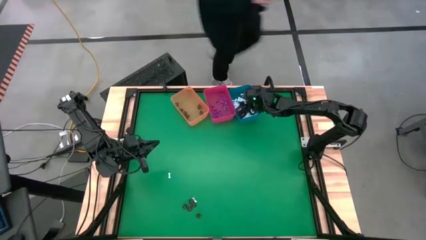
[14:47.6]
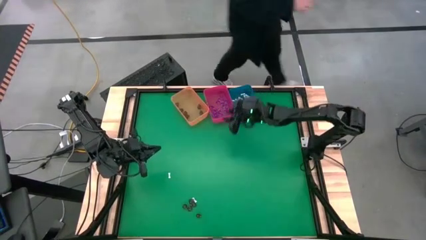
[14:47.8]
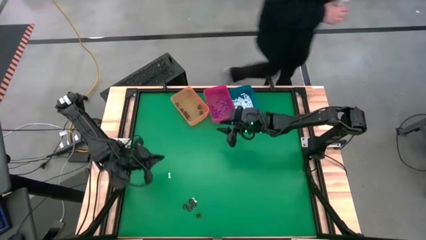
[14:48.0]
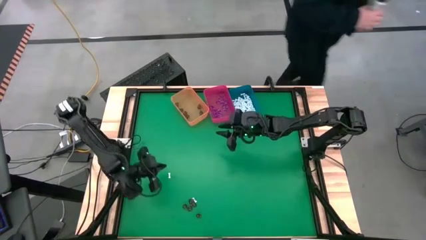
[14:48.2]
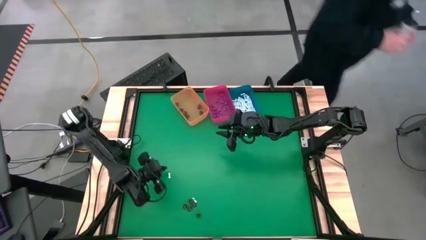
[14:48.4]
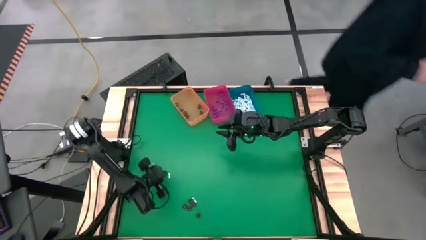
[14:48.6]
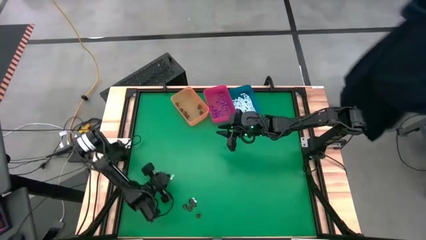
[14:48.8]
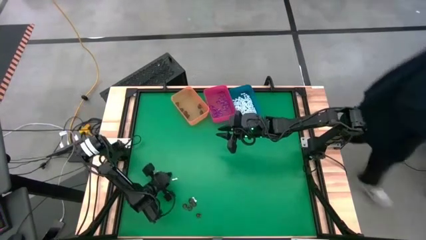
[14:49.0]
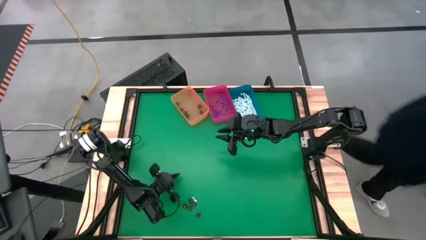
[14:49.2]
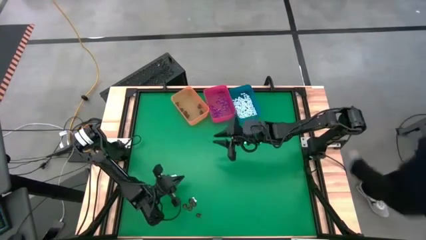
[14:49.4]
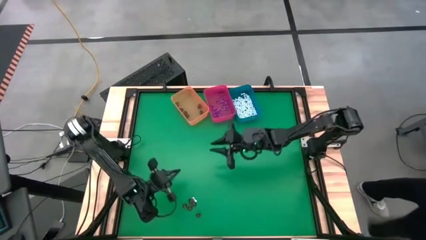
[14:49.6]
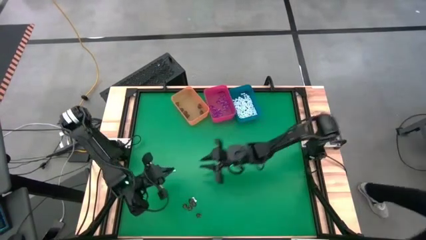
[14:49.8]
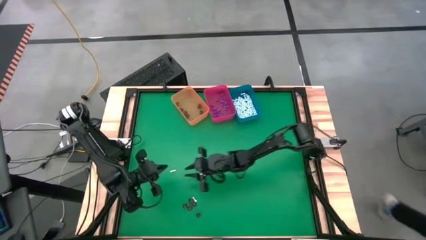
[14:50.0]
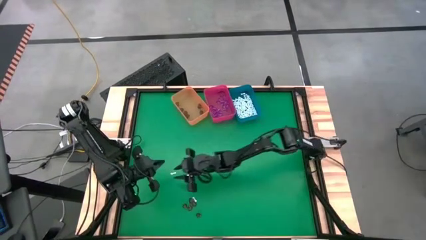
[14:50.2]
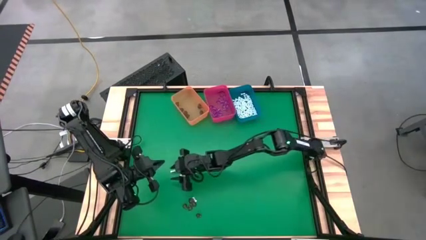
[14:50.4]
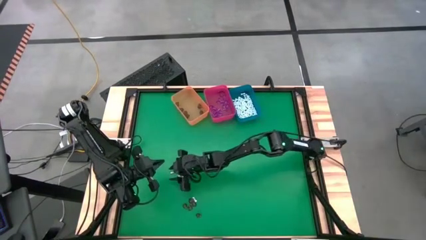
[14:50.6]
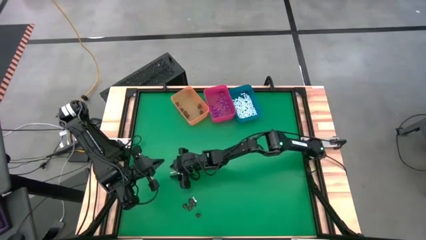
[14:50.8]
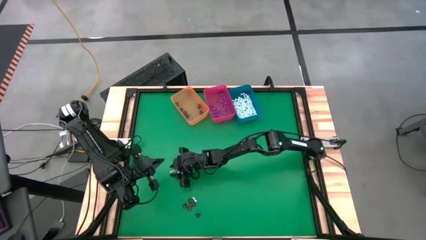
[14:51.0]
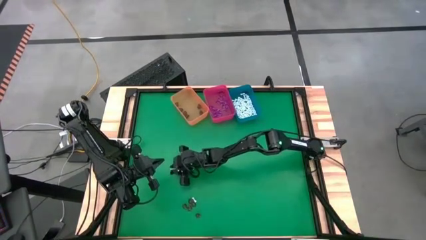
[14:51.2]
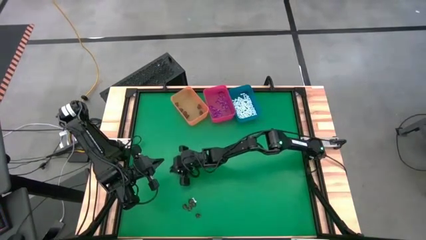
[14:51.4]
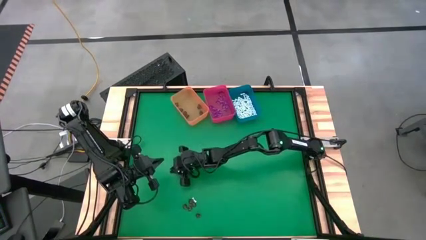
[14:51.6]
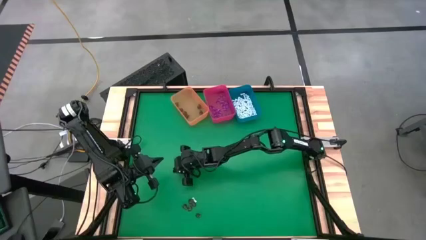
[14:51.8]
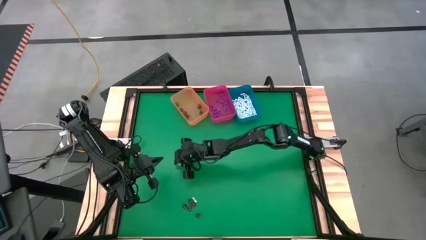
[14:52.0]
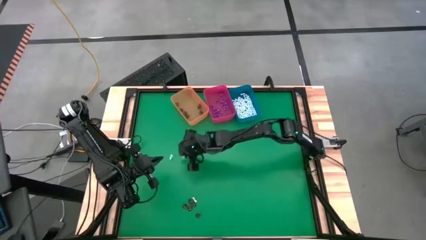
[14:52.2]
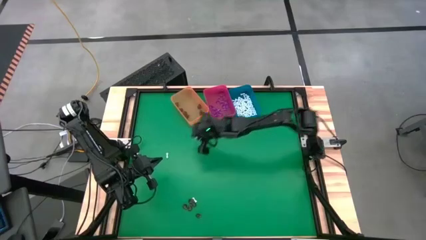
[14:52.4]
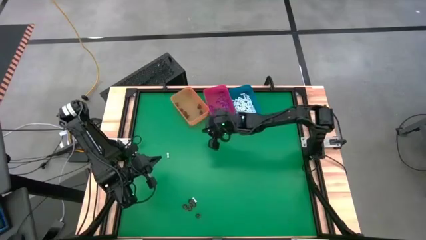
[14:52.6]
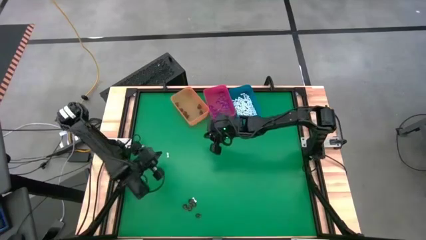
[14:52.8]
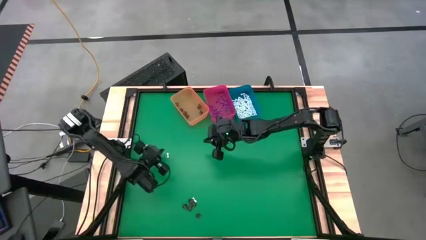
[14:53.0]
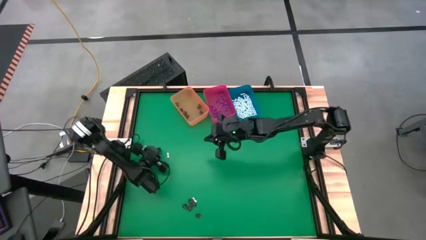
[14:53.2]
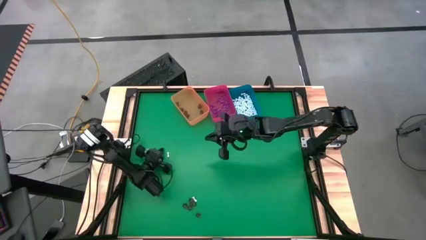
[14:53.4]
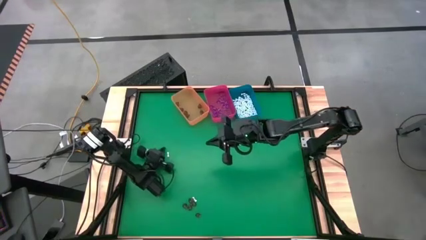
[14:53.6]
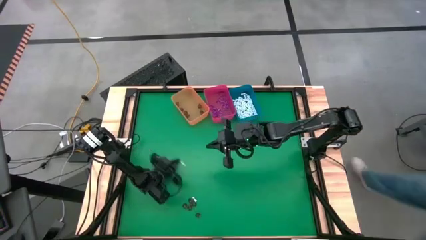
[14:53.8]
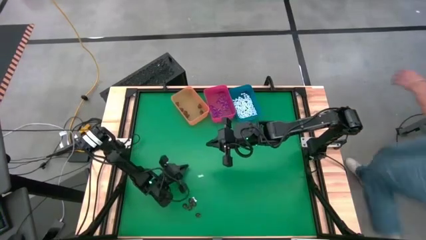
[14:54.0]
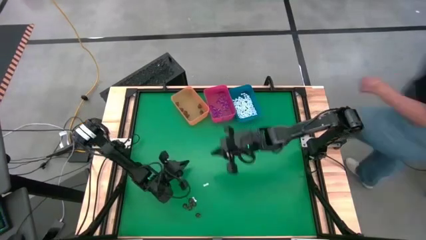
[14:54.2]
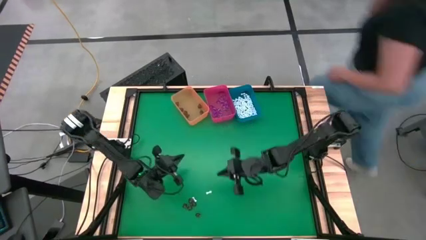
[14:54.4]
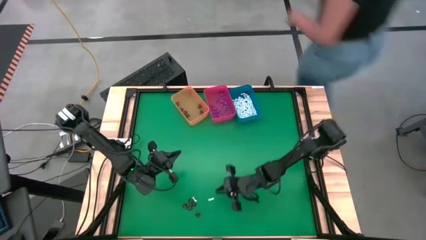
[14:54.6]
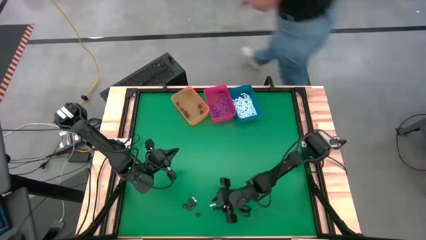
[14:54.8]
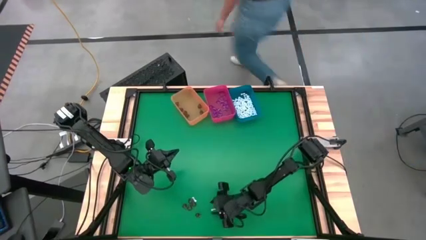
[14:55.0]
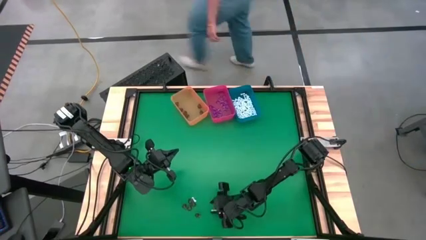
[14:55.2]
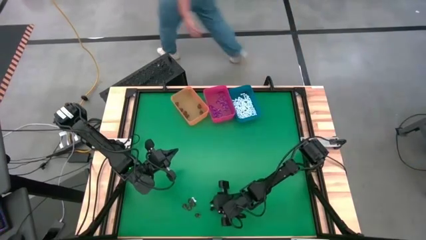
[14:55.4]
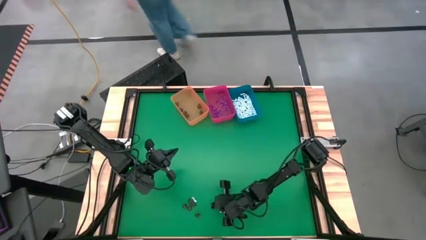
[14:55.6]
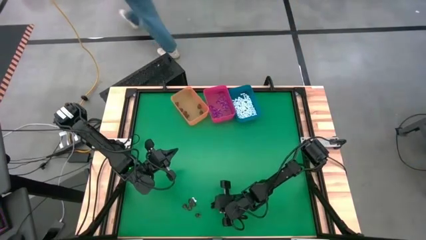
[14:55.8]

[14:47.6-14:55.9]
Task: Sort Halloween decoration
Put the top white bone toy into the blue bin

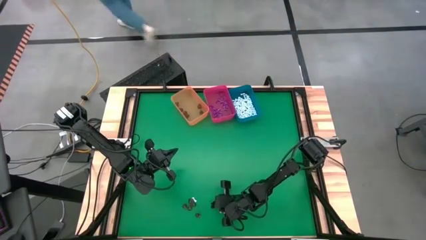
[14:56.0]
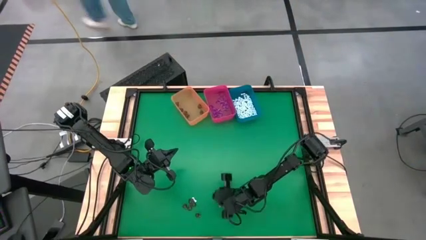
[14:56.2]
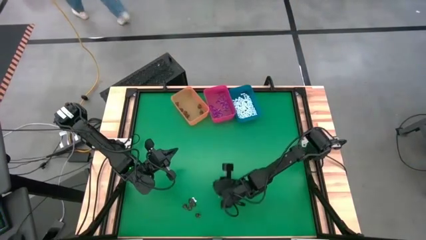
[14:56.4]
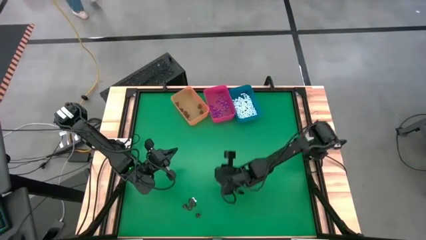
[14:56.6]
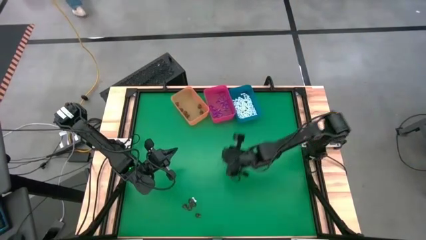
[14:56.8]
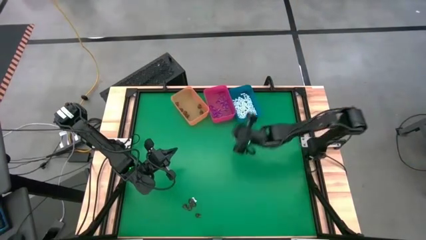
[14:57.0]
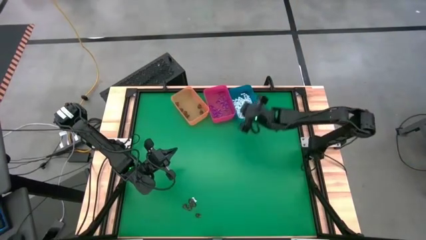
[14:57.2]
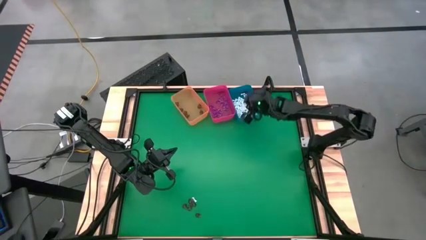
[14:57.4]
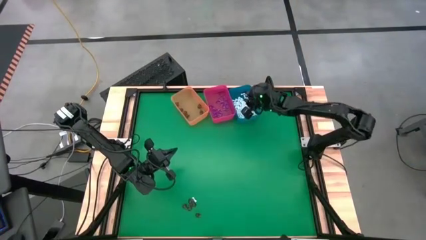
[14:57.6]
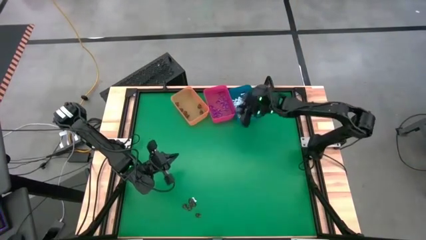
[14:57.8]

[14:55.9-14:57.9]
Put the top white bone toy into the blue bin

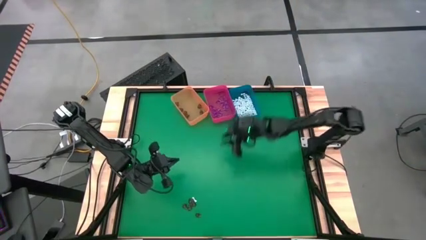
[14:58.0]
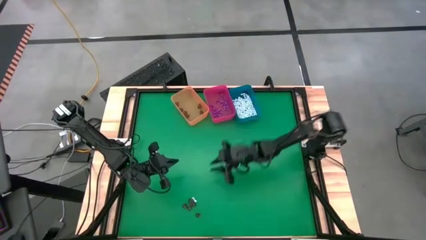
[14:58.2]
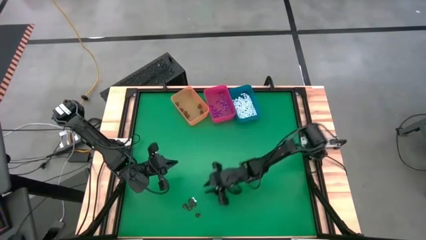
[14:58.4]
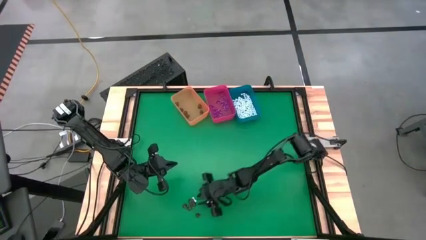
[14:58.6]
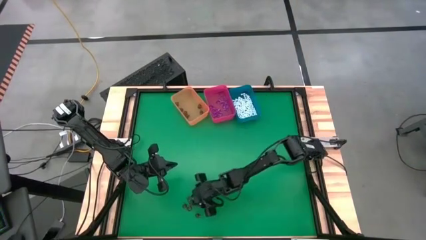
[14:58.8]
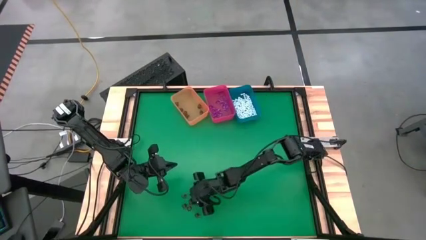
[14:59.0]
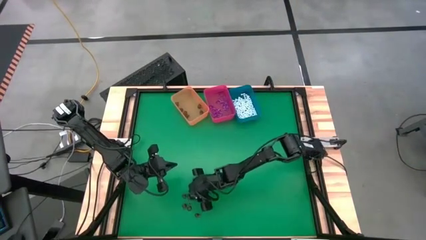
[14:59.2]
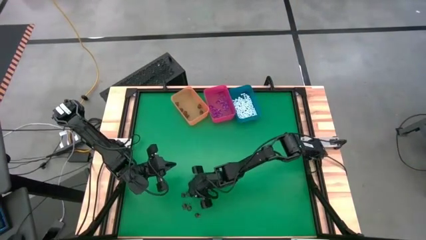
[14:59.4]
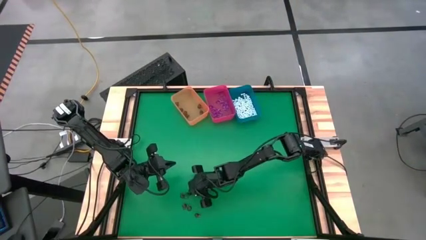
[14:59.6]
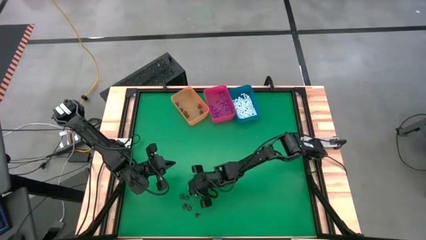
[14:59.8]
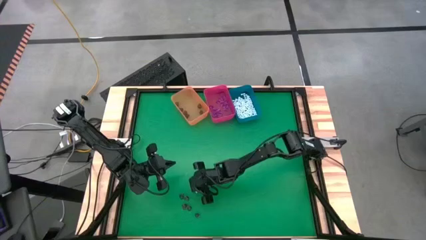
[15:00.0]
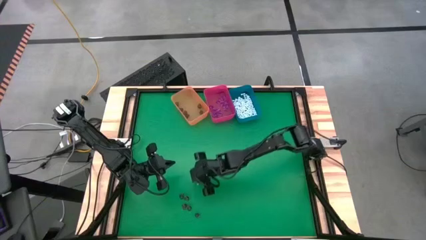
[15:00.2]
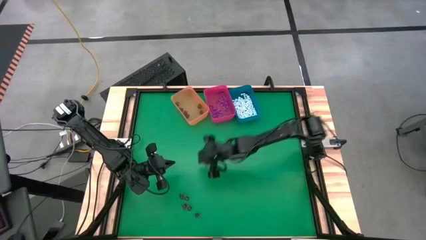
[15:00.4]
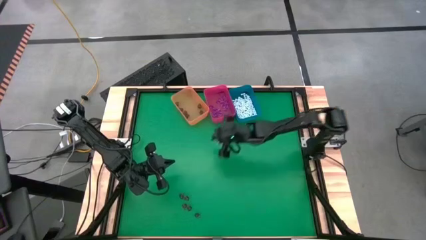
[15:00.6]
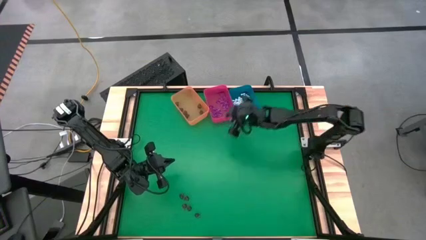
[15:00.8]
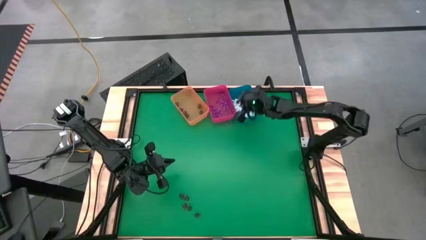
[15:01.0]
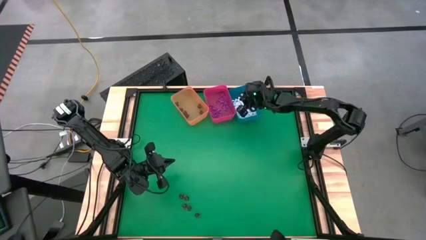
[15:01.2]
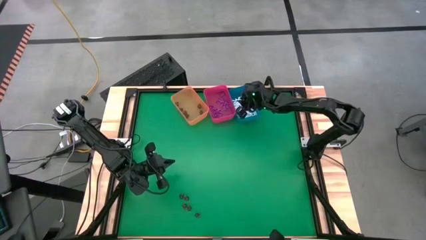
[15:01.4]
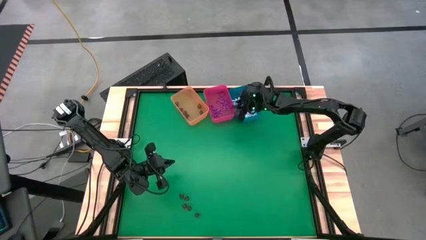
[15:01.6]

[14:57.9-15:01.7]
Put the white bone toy into the blue bin

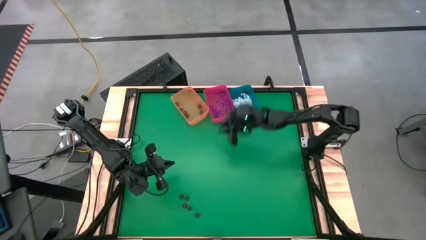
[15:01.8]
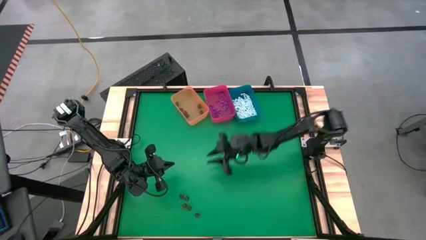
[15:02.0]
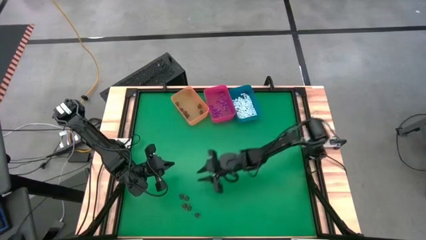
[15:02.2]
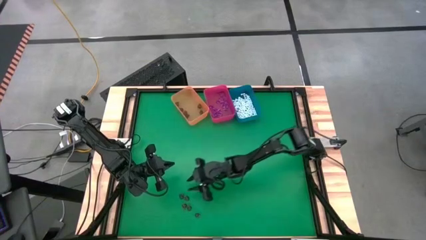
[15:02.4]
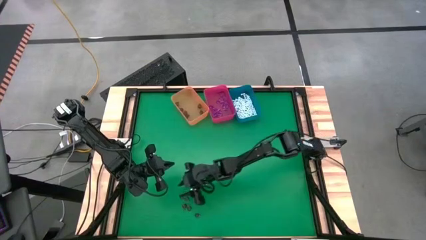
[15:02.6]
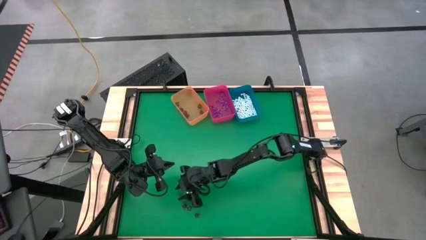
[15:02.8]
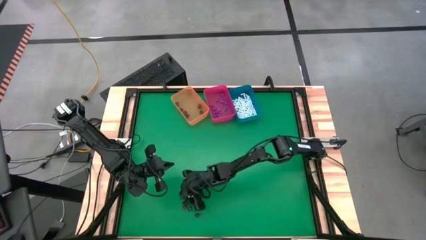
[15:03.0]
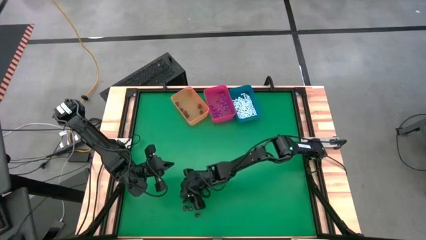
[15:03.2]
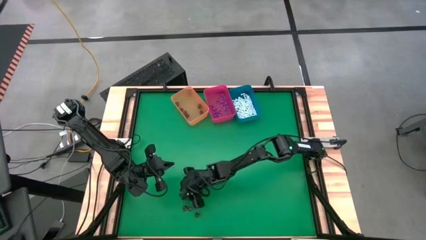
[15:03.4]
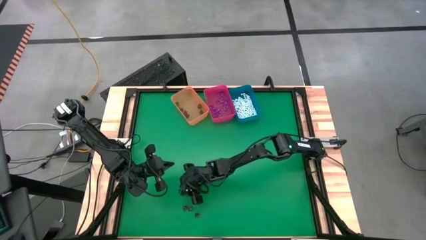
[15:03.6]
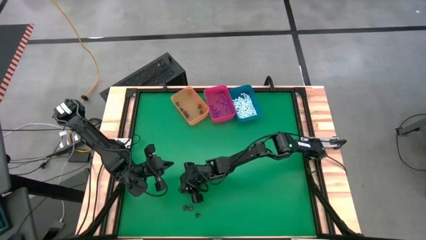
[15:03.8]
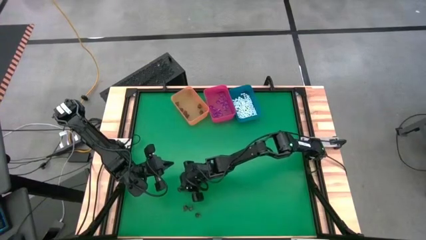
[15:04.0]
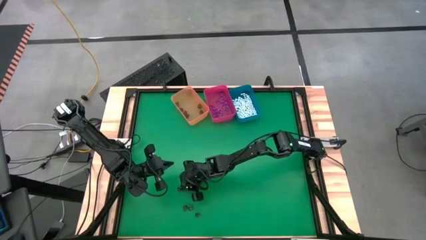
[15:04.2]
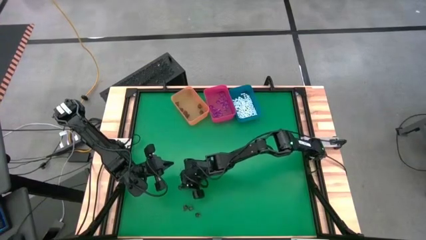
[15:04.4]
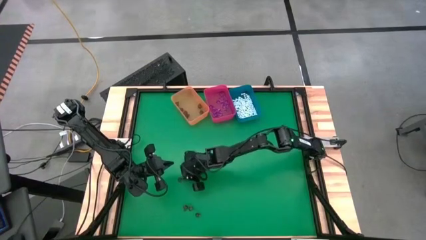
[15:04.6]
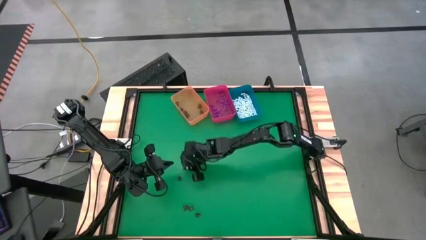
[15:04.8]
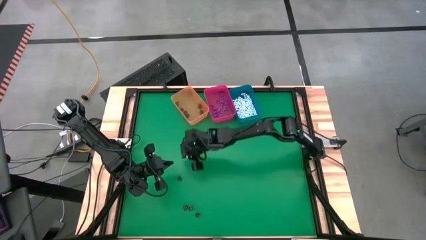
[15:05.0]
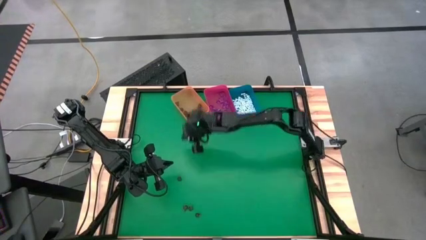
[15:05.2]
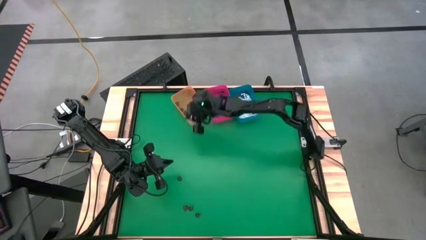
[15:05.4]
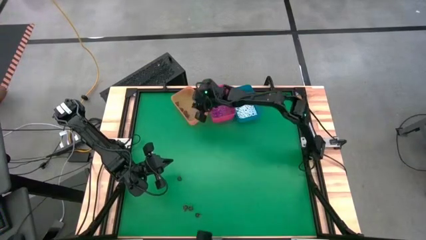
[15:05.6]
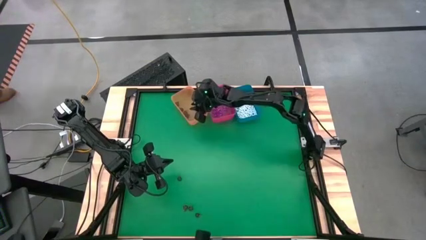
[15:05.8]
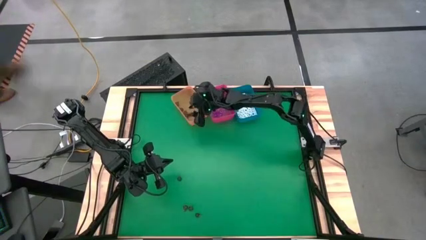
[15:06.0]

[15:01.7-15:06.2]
Put the transparent black skull toy into the orange bin
